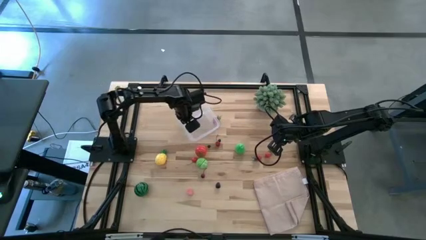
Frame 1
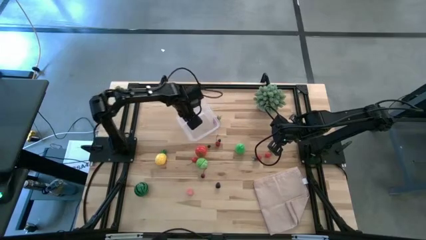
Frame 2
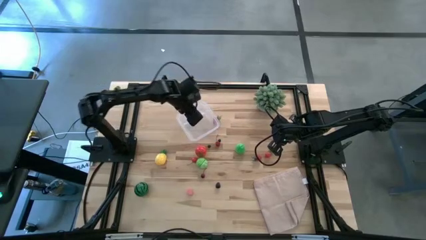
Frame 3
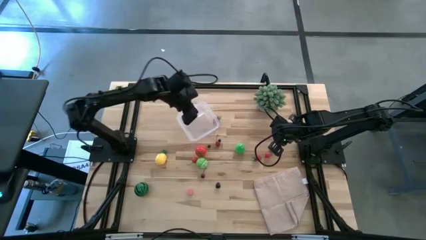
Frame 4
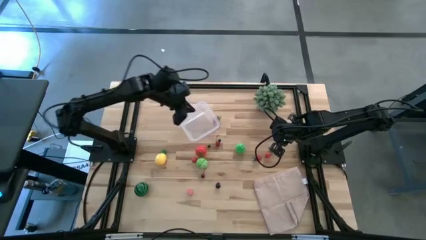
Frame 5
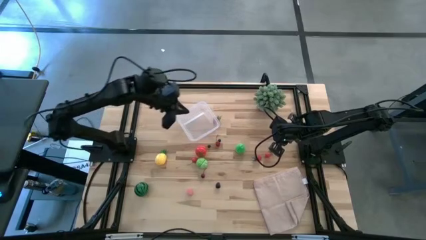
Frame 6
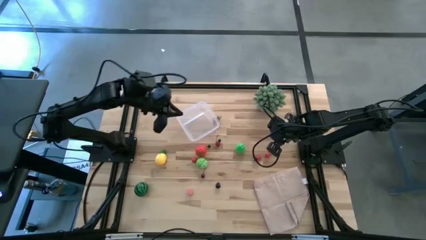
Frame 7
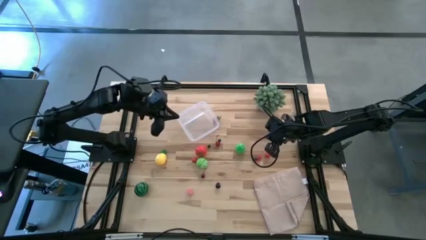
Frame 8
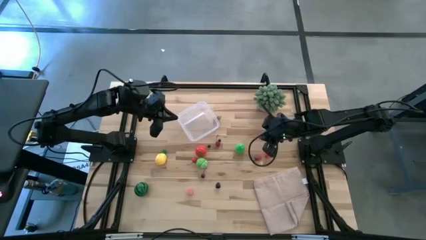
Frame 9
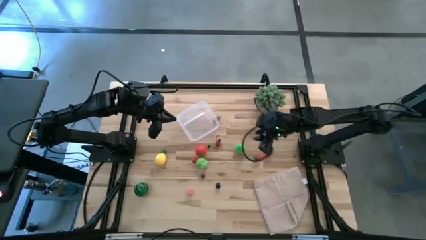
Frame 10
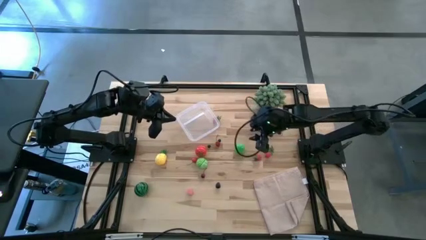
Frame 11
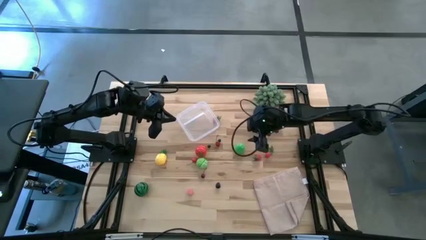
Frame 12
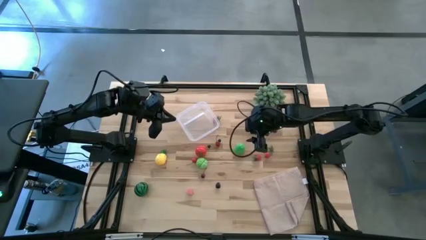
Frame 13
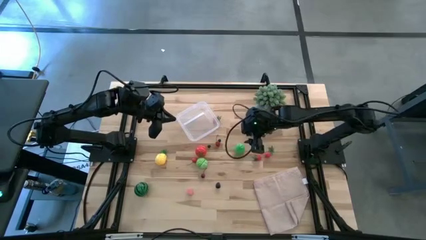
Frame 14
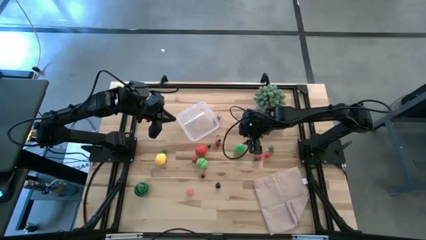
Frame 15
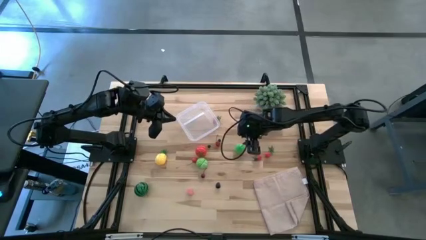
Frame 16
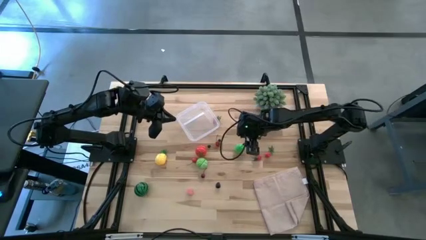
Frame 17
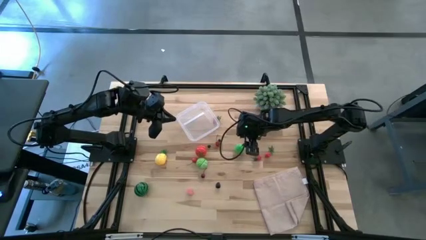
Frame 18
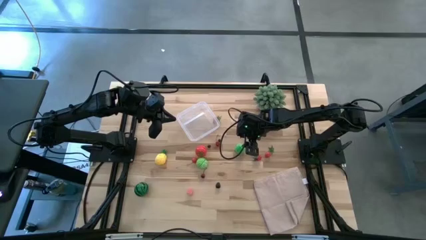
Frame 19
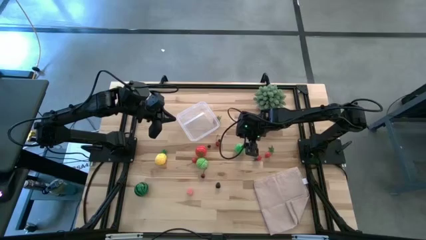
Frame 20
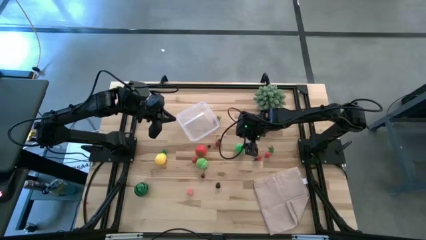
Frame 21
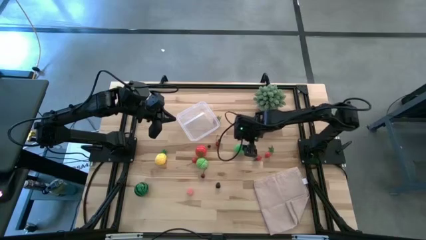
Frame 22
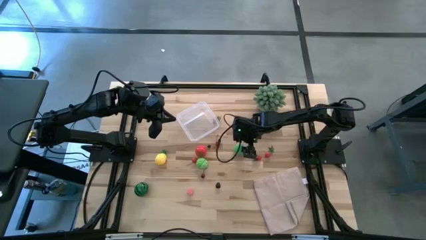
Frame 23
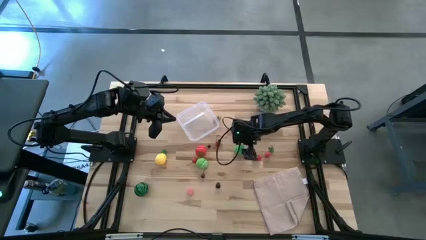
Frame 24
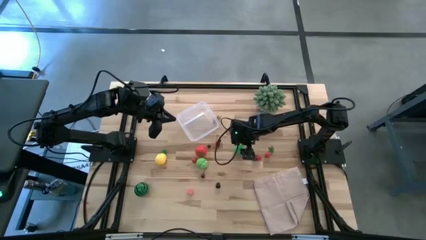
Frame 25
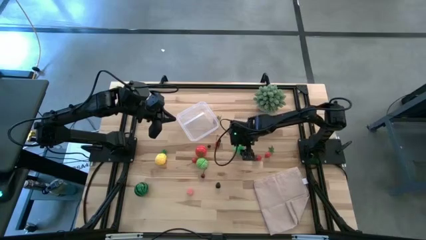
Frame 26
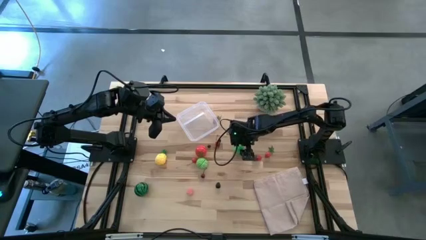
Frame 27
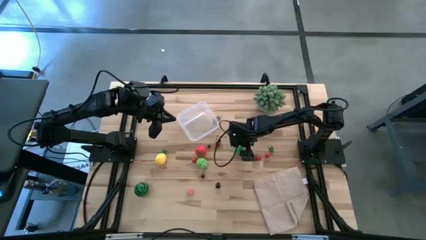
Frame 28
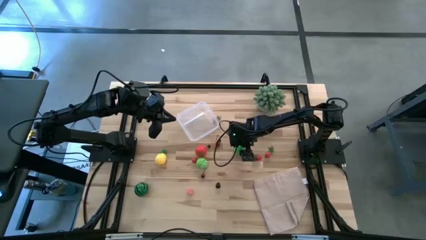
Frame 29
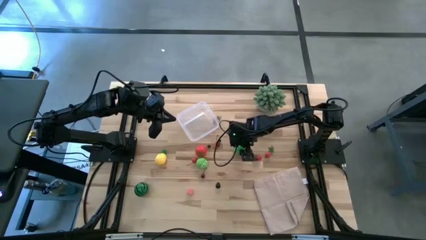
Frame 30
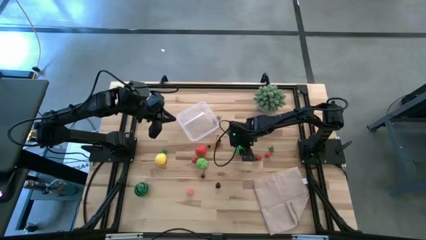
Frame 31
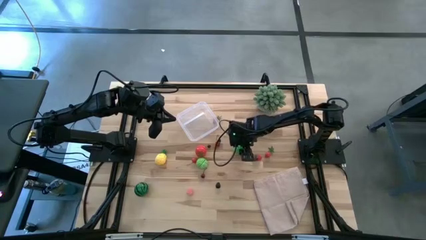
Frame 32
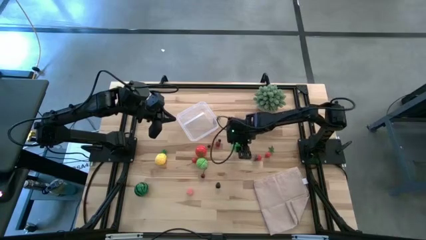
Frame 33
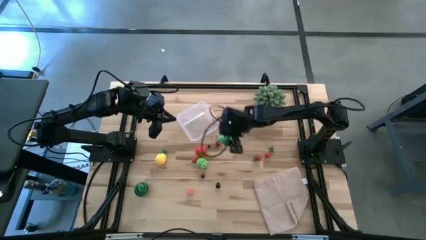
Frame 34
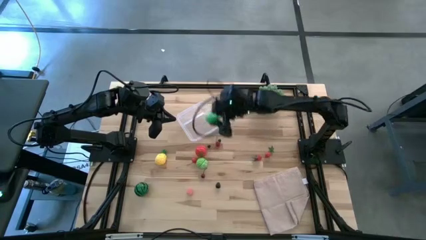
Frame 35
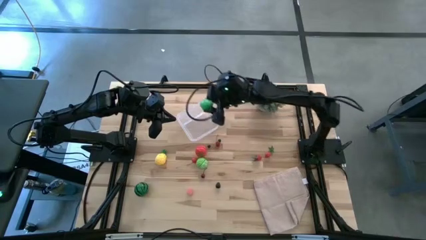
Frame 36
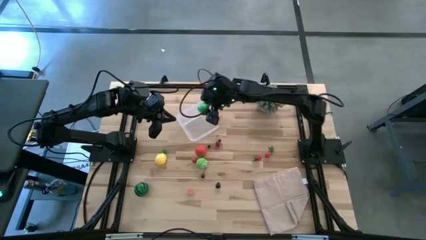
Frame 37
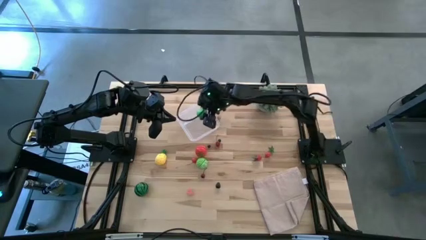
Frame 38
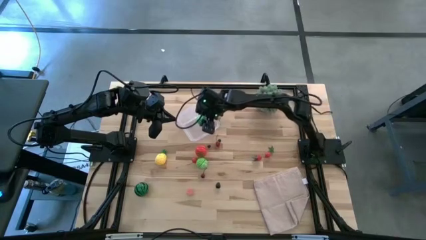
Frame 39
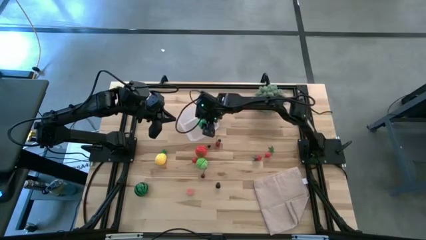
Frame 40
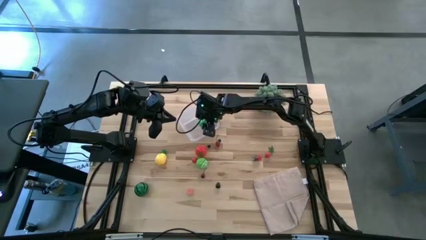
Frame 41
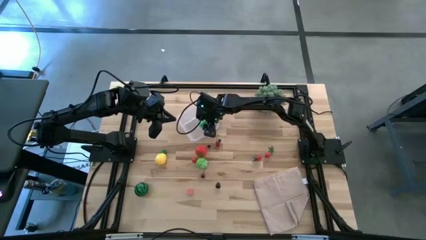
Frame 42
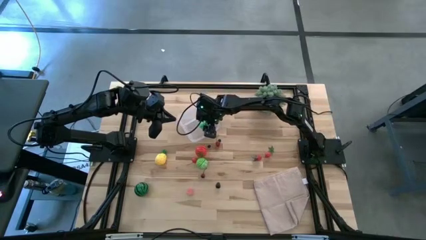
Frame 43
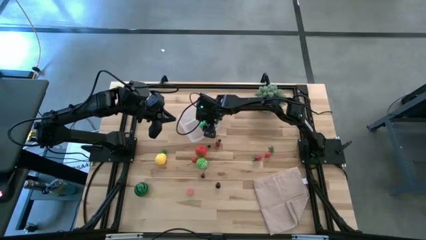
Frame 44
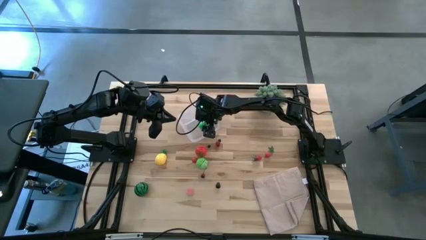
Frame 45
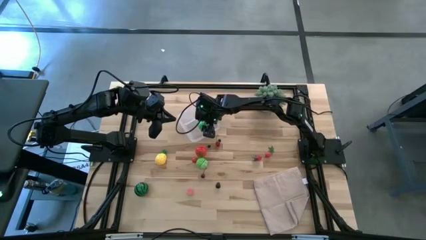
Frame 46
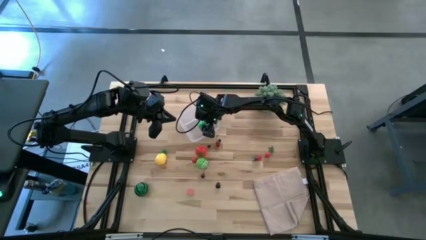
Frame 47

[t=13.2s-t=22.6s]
Task: Pick and placing Produce into tupperware
Put the green pear into the transparent bin

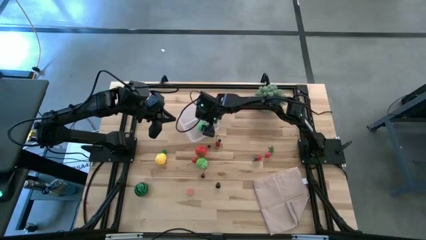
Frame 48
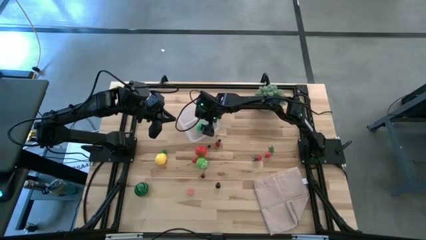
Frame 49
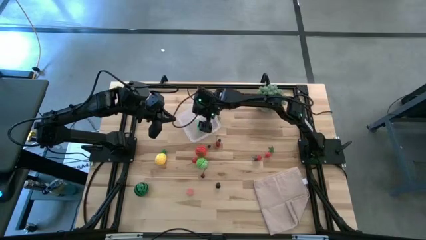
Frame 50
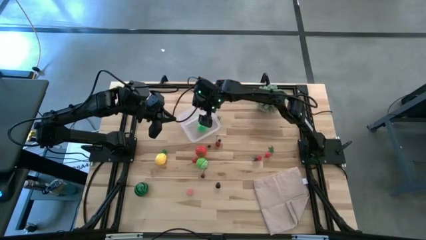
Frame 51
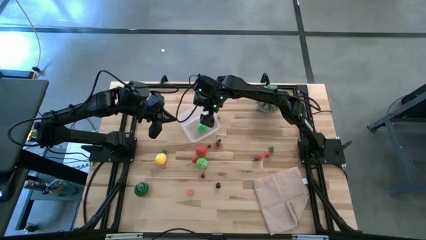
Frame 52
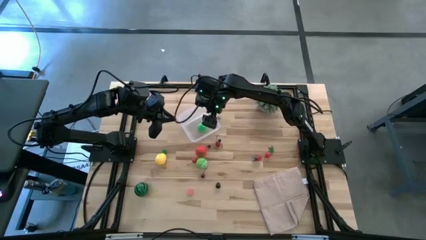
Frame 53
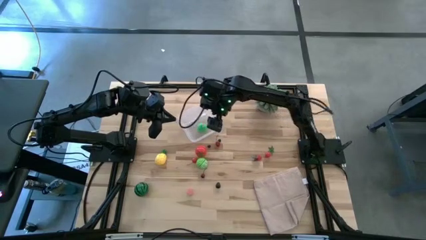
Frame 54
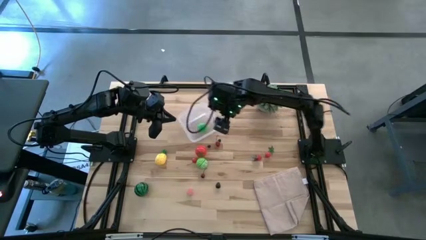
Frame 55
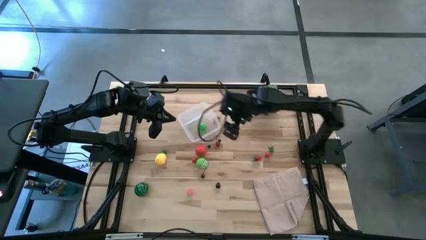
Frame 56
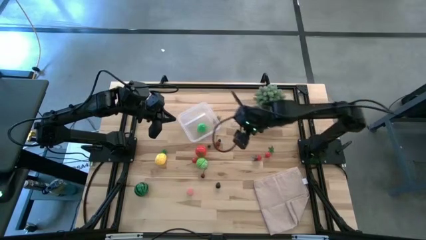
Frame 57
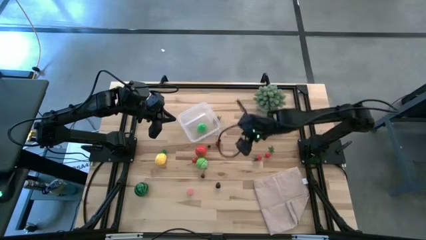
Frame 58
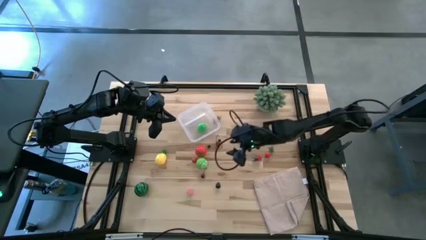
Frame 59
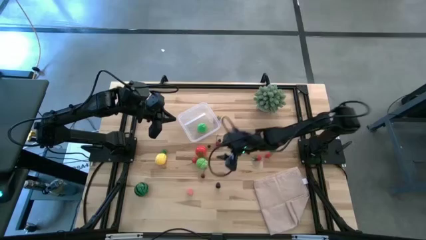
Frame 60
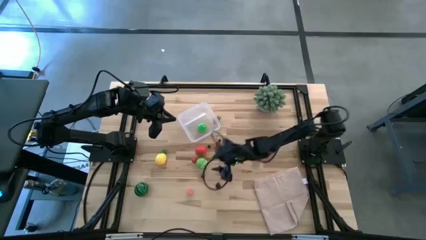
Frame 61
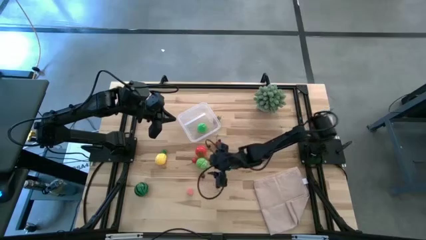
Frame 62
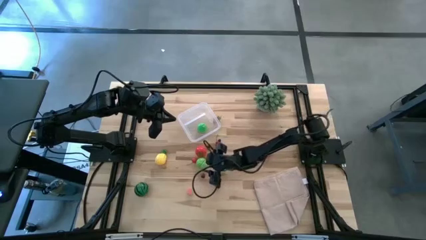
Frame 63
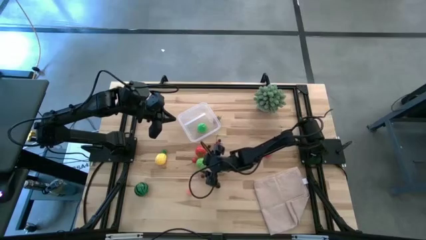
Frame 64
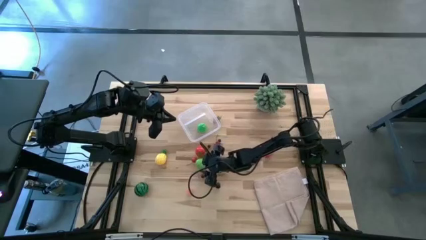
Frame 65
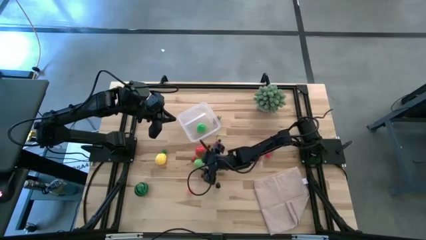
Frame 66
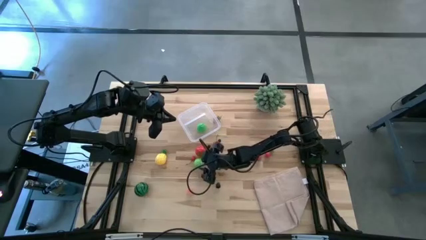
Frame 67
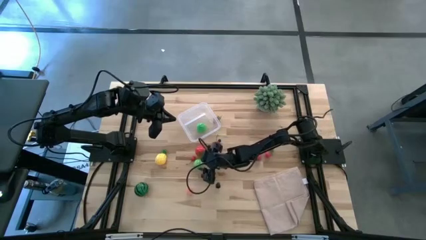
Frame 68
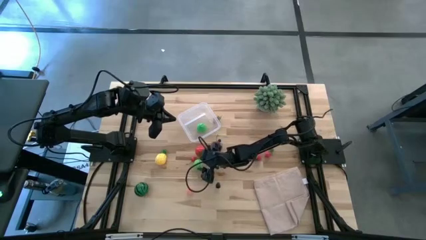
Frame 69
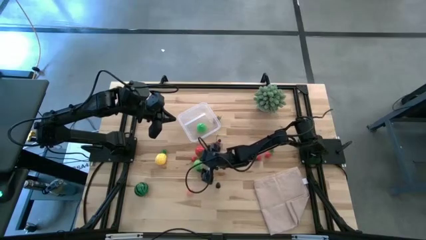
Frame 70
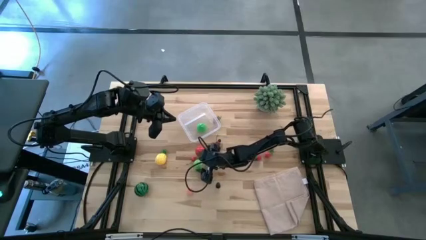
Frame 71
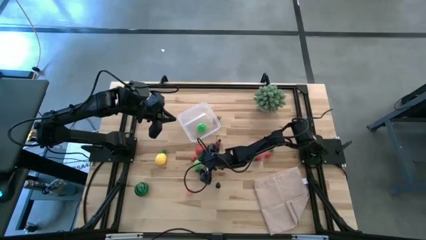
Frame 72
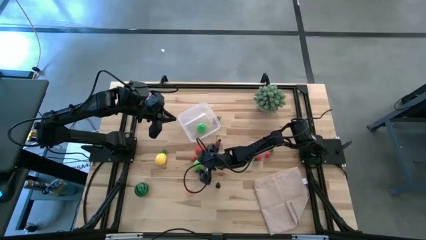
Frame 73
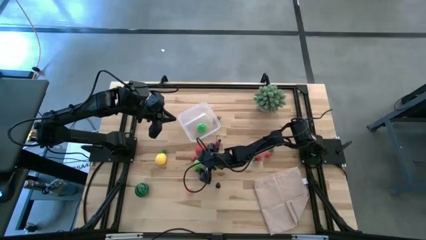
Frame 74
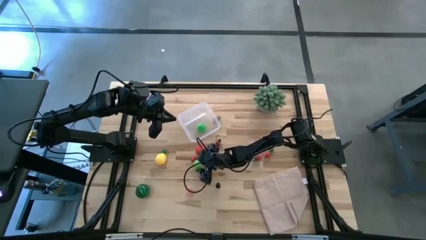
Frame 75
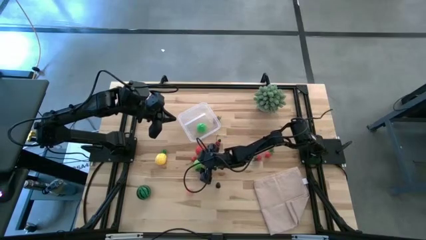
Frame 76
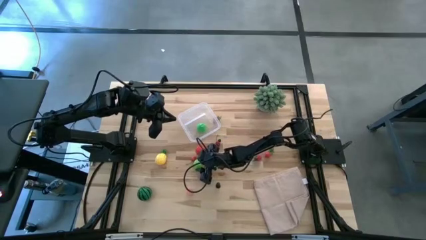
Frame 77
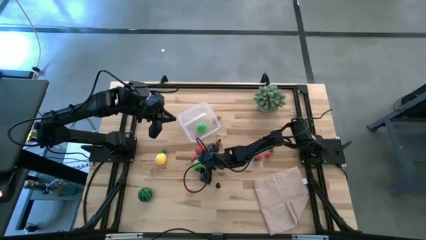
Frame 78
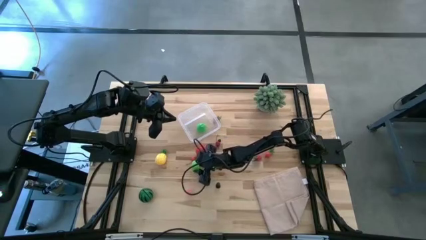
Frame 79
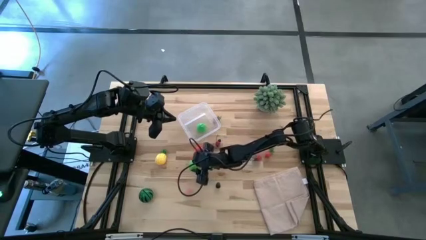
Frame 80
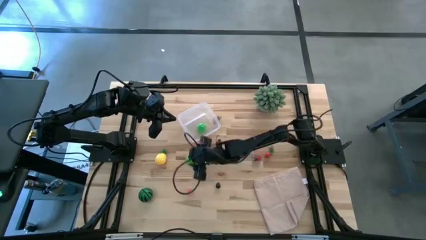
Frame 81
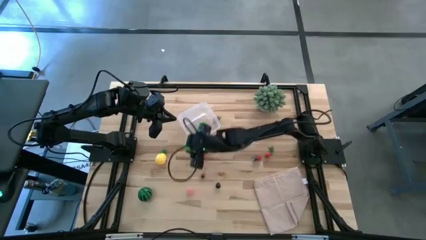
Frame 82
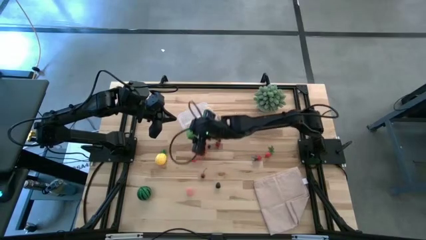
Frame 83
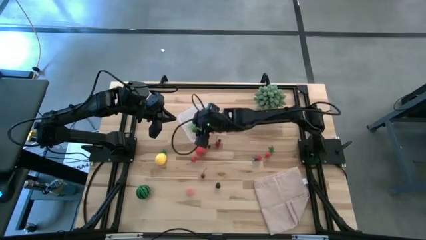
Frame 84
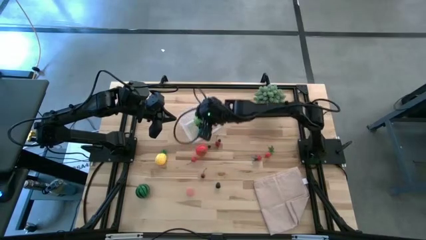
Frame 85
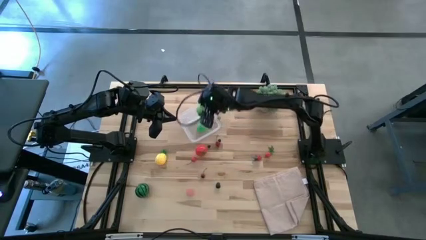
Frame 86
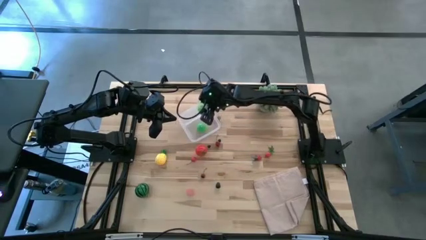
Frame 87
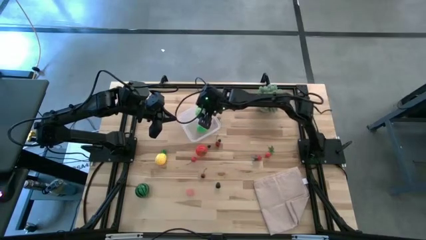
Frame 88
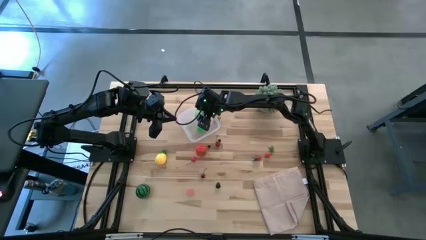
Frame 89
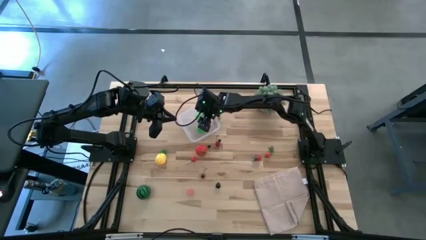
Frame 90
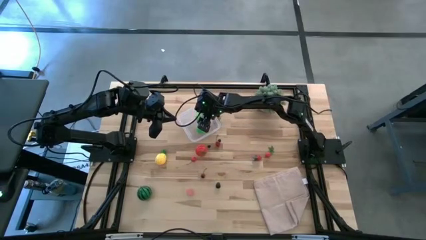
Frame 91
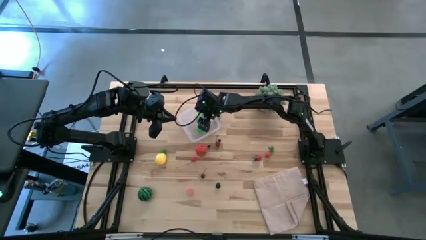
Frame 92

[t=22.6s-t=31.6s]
Put the green cabbage into the transparent bin
